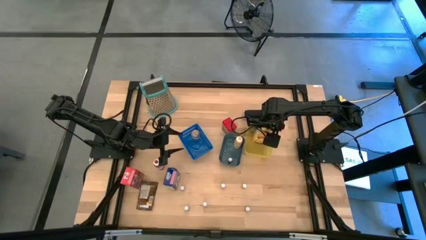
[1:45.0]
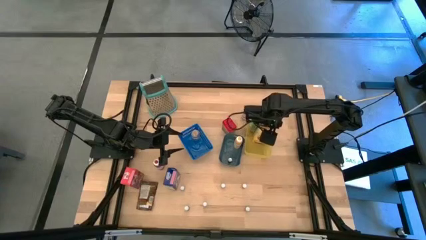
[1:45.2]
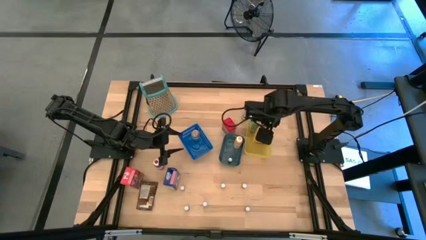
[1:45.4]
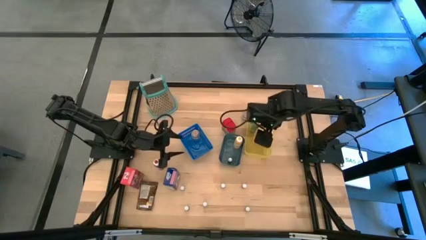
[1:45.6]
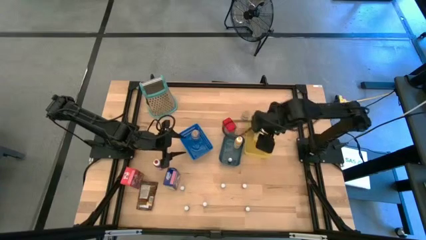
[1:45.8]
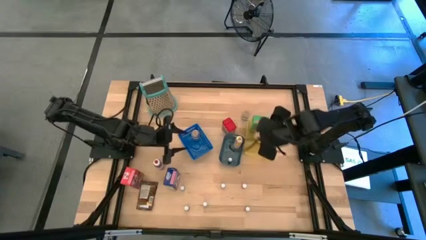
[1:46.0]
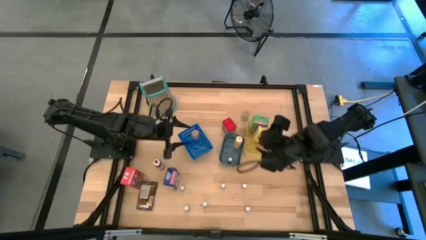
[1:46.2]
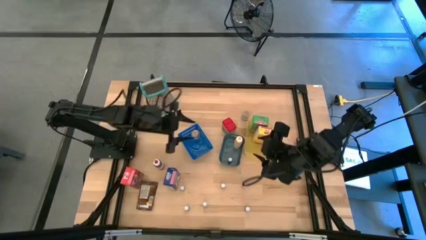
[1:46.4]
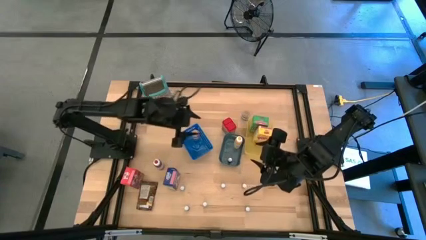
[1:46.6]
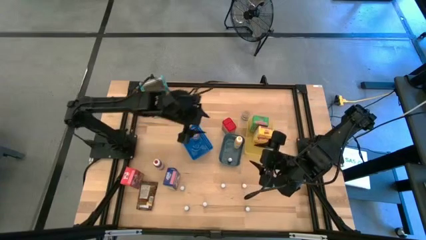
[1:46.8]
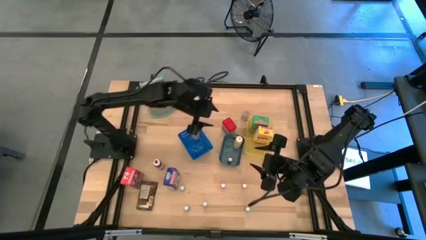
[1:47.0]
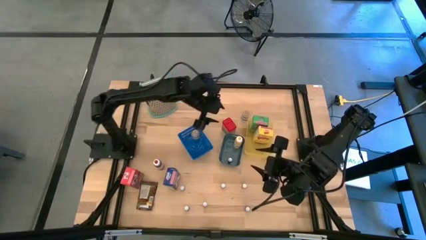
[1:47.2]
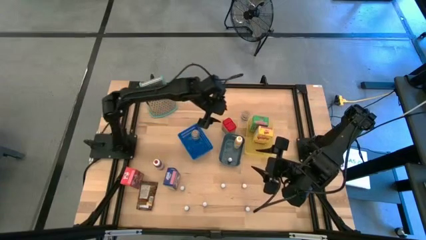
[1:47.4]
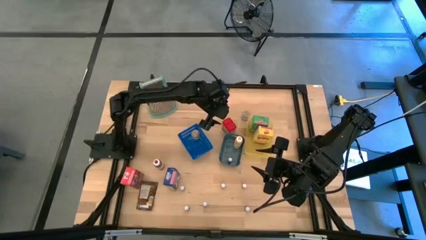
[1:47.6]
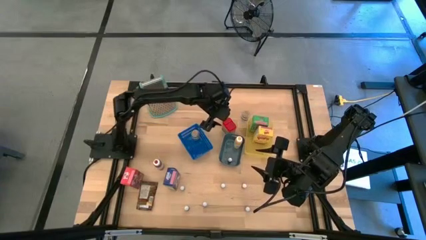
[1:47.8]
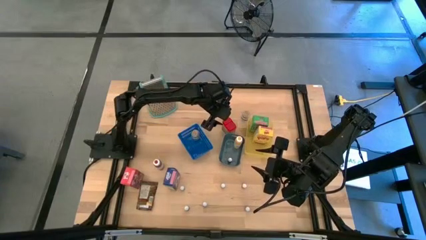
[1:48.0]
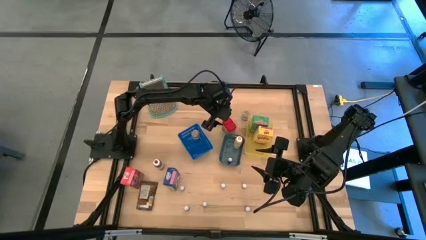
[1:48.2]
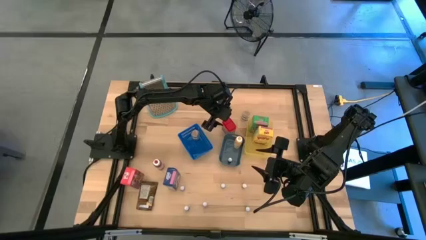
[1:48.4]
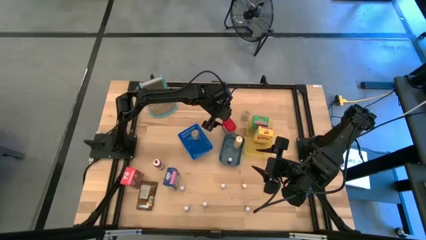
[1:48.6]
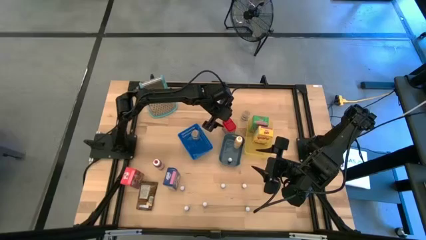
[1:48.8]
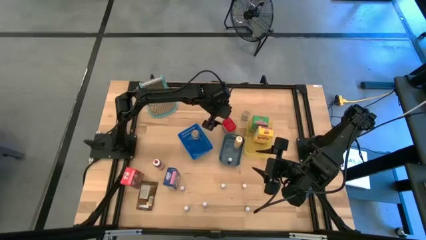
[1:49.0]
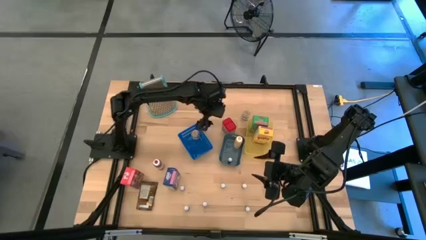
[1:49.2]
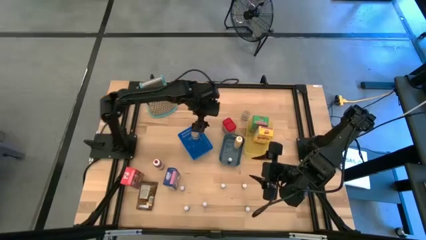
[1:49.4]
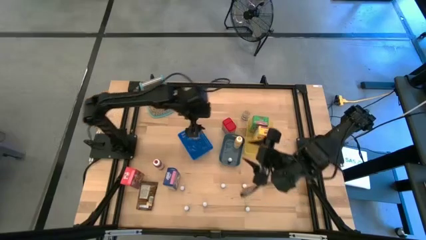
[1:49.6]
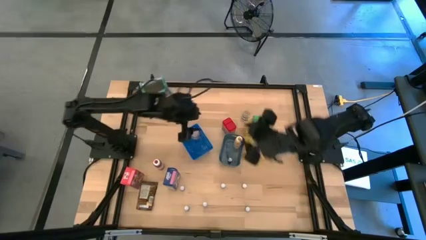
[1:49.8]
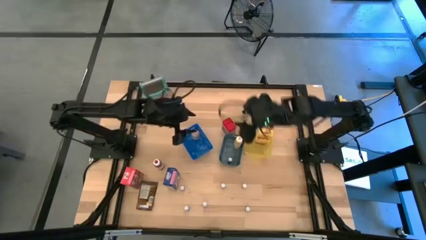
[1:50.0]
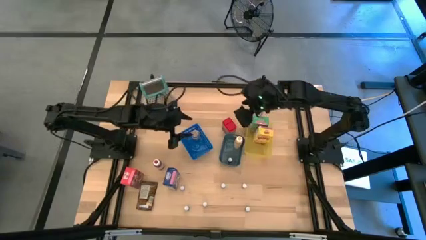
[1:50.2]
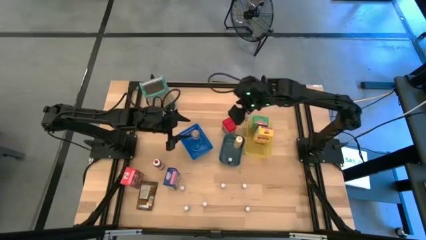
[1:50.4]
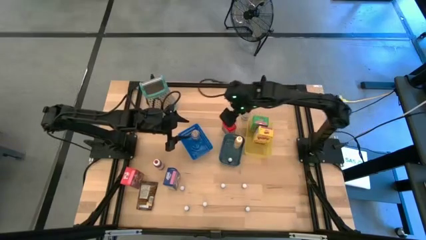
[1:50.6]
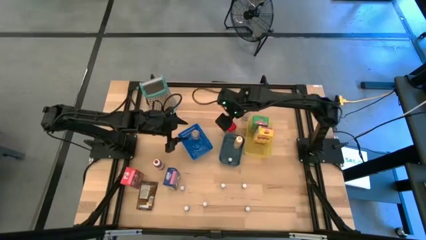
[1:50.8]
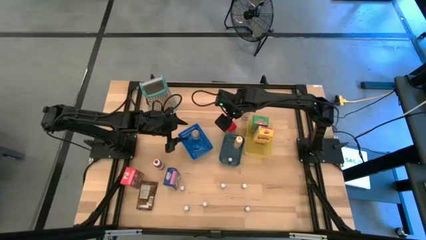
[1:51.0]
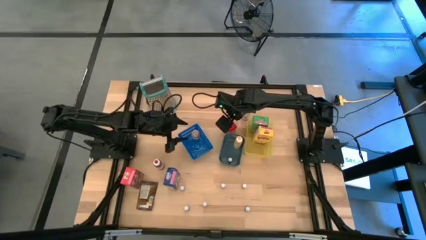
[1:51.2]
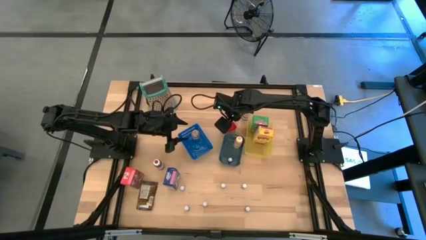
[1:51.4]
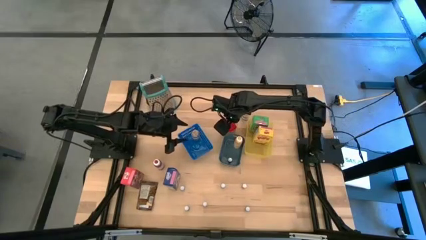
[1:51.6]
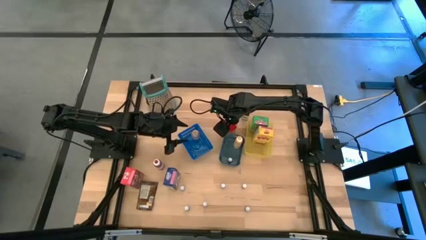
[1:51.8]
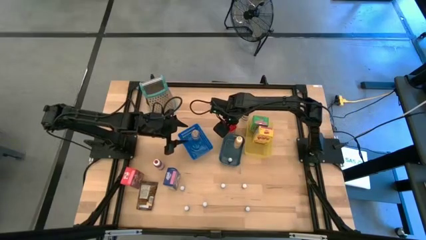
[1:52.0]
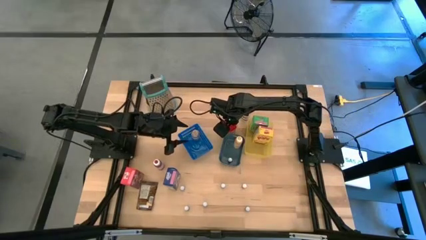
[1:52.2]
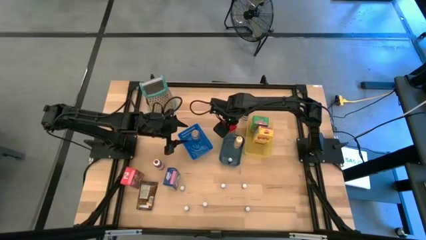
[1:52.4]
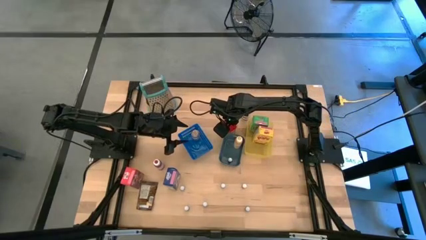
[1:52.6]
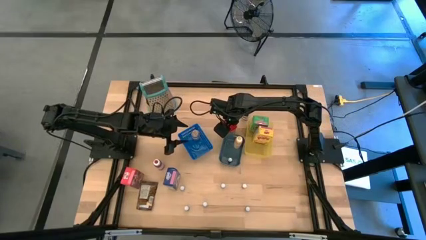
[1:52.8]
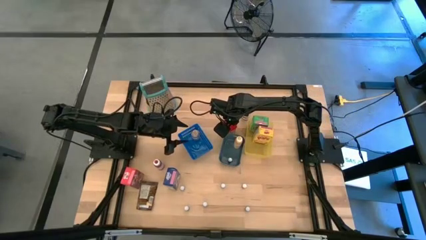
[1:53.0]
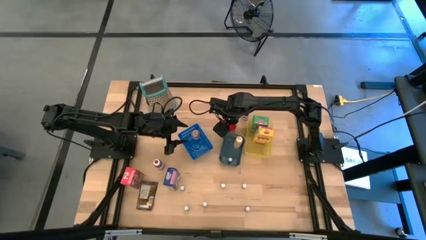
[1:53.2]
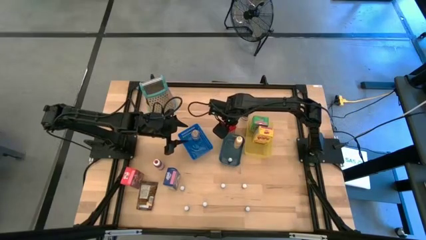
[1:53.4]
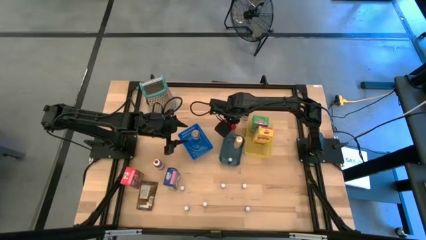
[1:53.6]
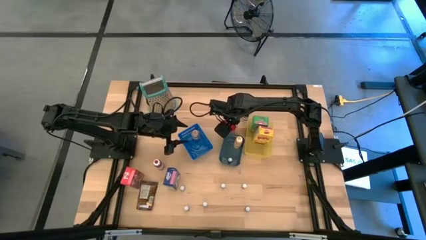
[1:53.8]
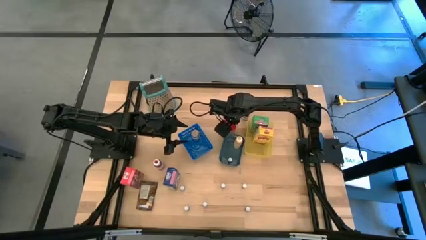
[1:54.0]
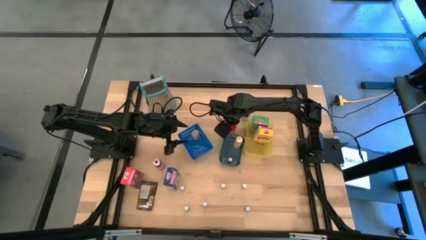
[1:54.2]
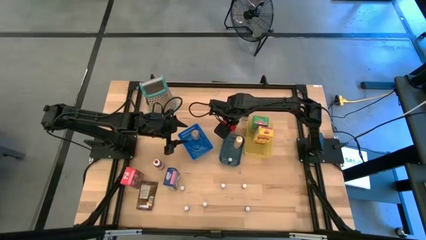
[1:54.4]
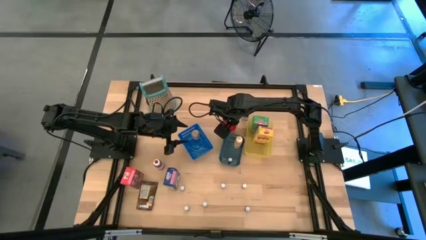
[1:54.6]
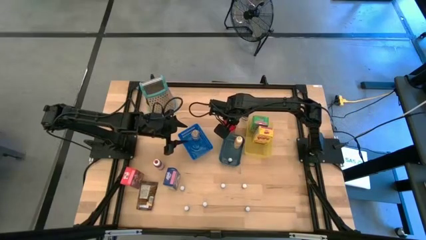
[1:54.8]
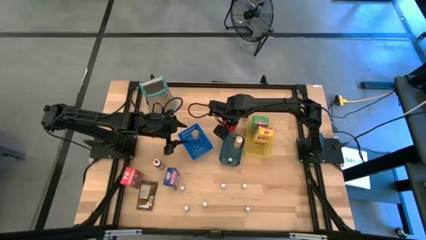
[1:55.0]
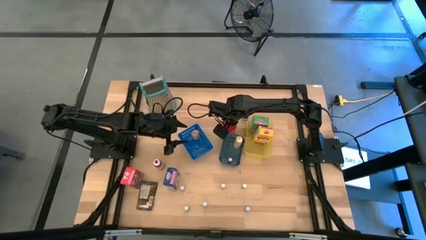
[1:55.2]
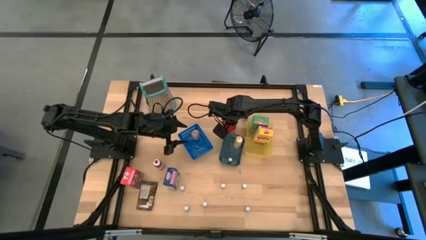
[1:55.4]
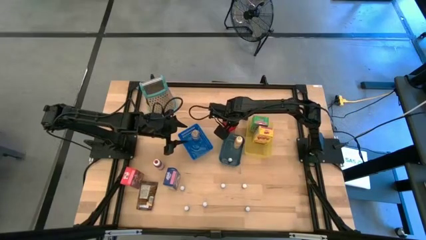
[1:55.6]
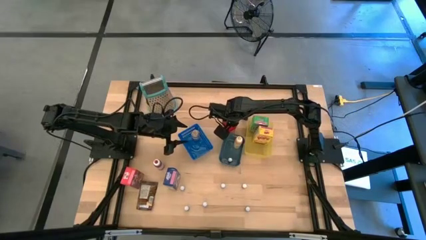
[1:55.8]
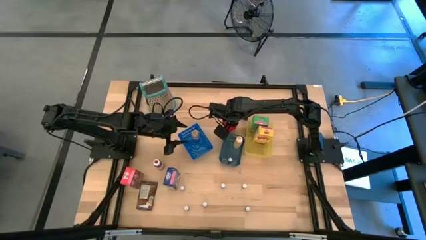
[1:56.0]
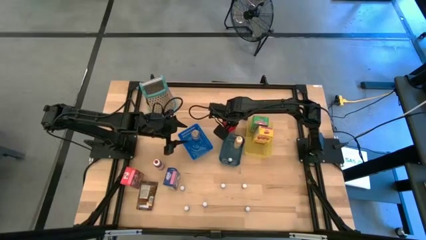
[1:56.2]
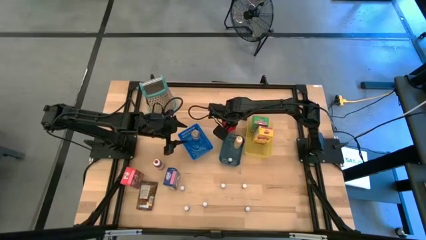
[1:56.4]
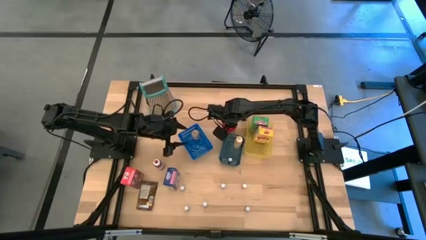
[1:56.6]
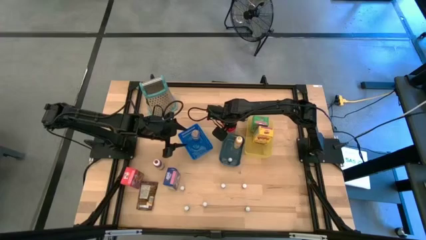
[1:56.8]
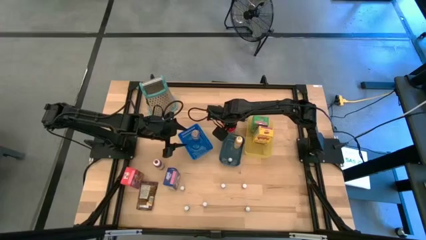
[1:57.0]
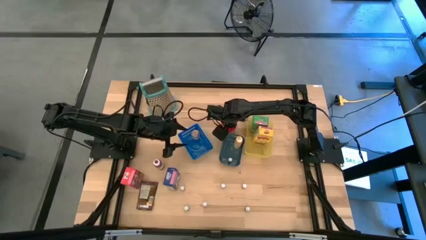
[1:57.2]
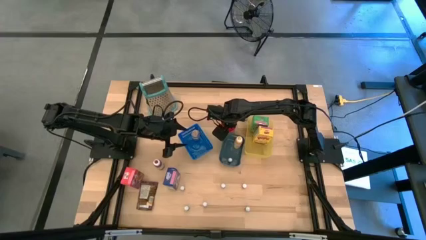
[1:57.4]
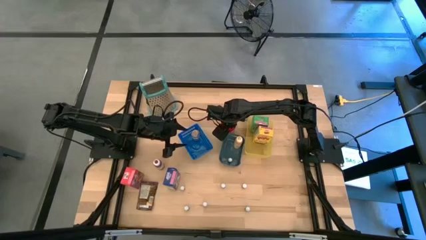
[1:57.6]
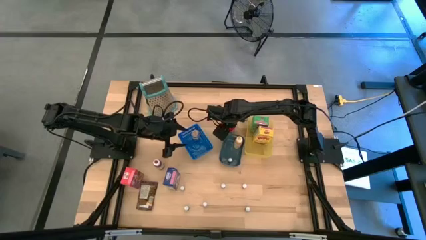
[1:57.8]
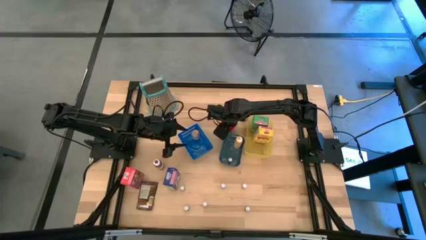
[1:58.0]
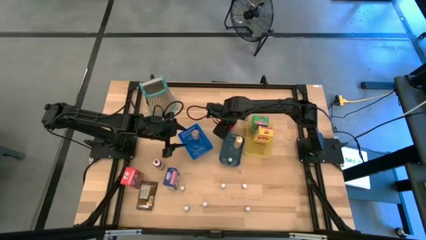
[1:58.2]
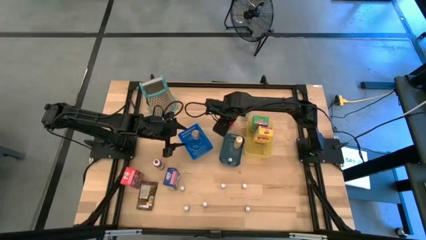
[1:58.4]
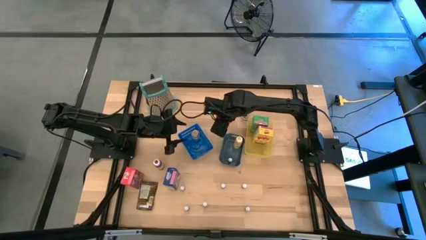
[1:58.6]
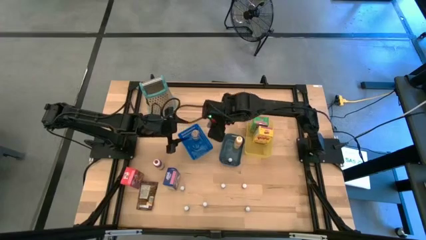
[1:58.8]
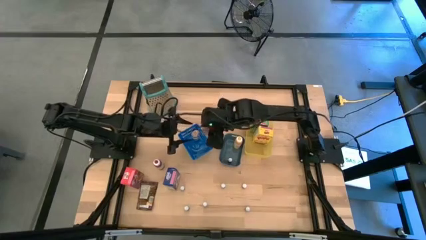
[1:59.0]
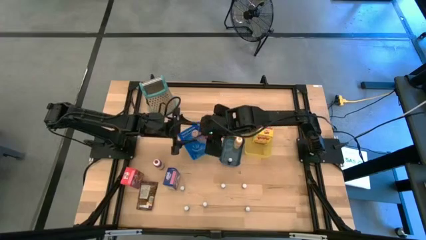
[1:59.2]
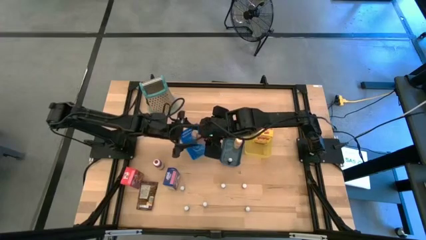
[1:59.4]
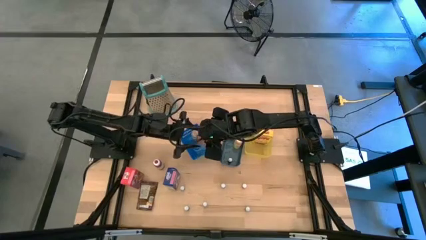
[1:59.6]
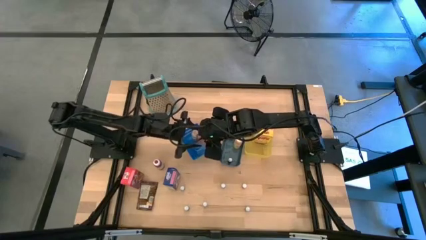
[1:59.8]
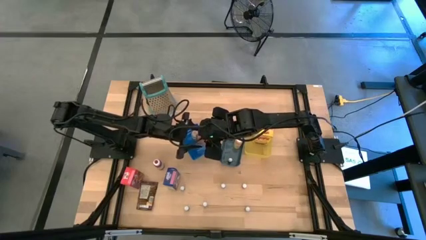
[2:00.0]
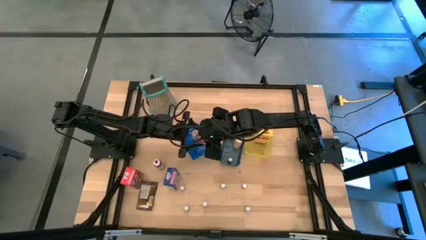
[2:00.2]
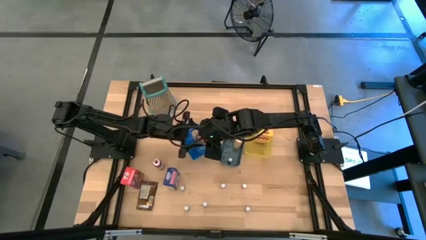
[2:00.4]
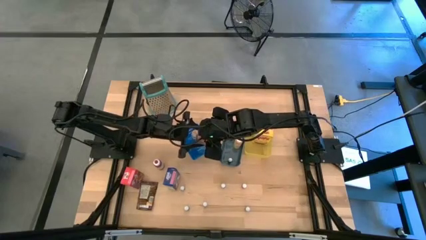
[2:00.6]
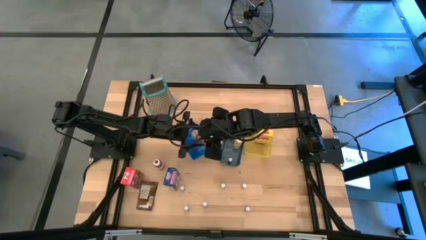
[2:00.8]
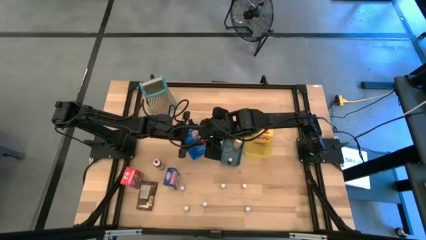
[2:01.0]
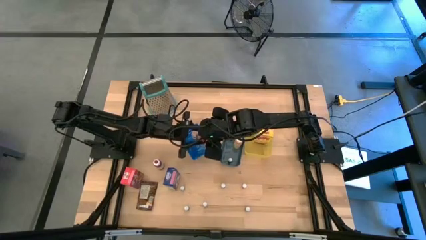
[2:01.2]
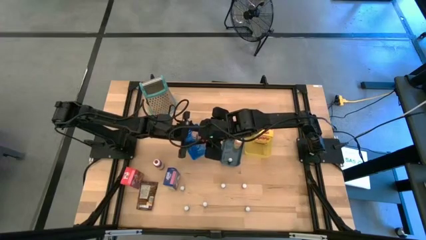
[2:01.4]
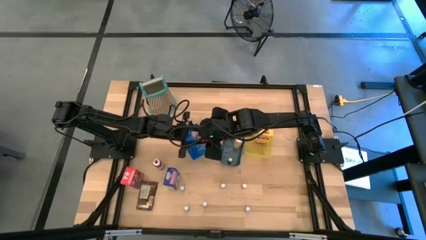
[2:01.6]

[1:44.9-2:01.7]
Task: Pick & Place Kitchen Items
Put the red seasoning can into the blue bin
